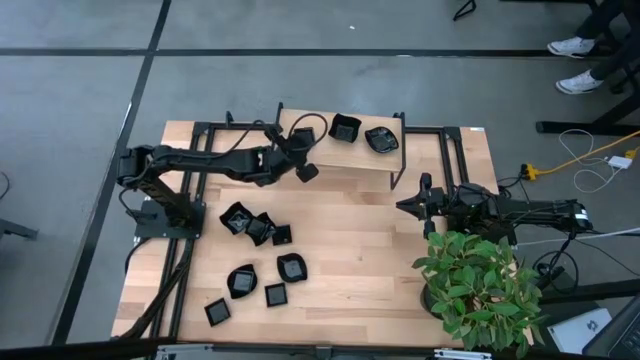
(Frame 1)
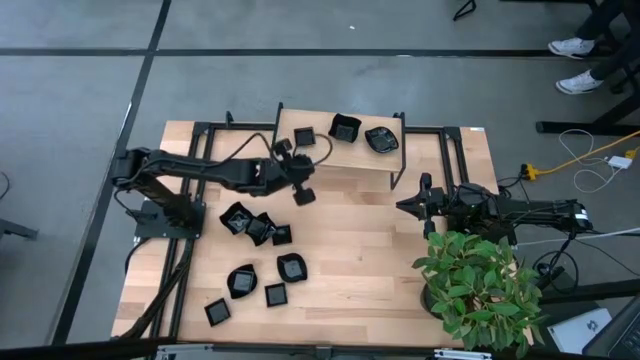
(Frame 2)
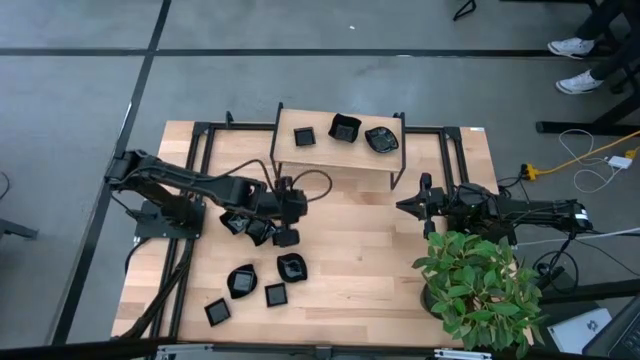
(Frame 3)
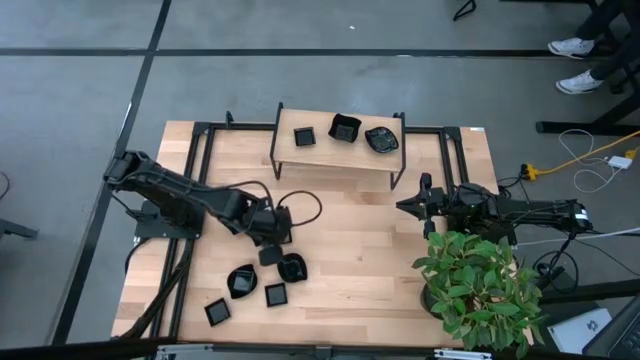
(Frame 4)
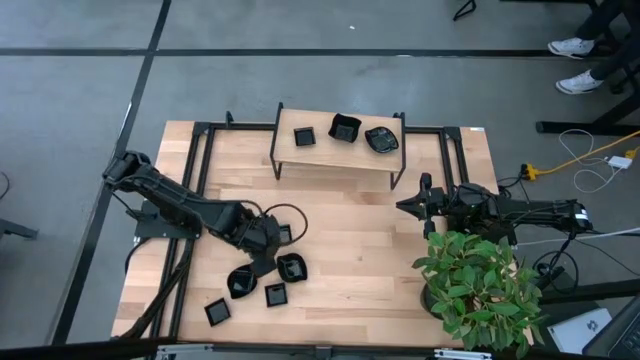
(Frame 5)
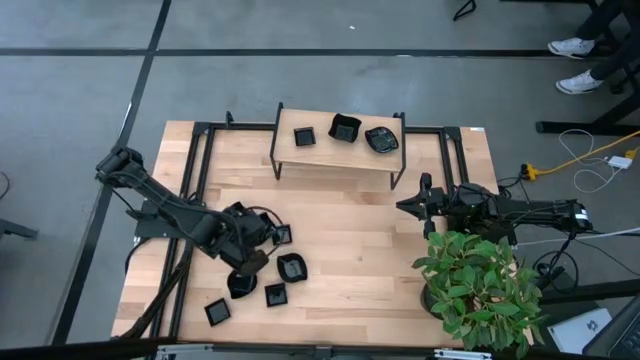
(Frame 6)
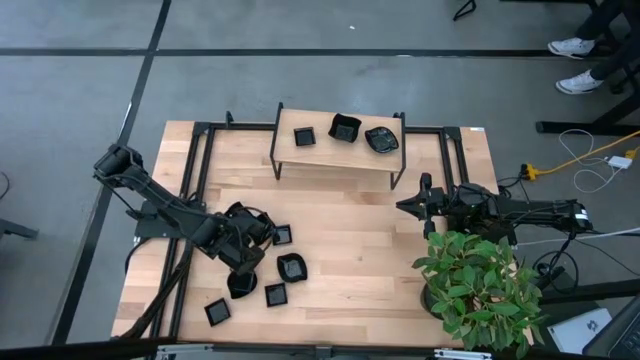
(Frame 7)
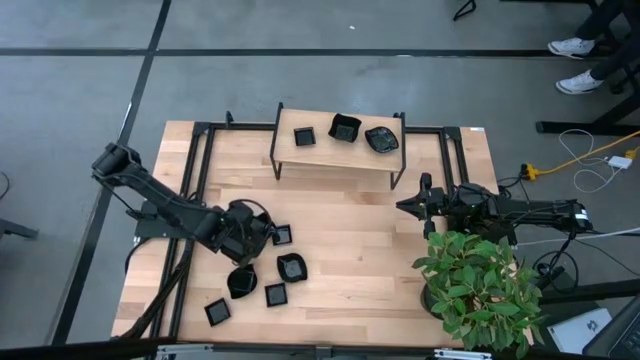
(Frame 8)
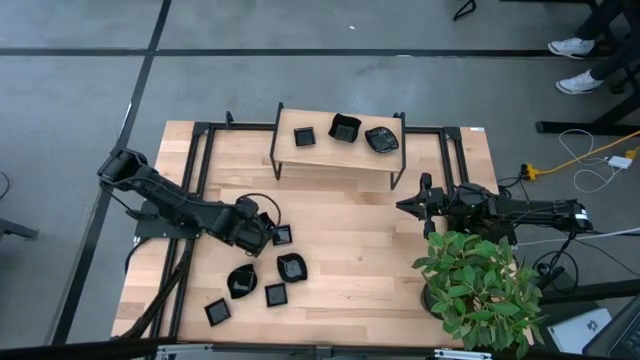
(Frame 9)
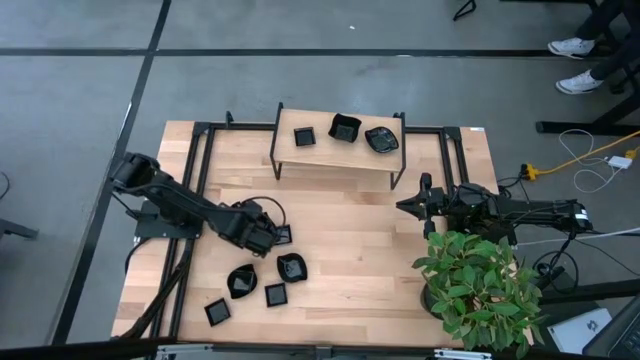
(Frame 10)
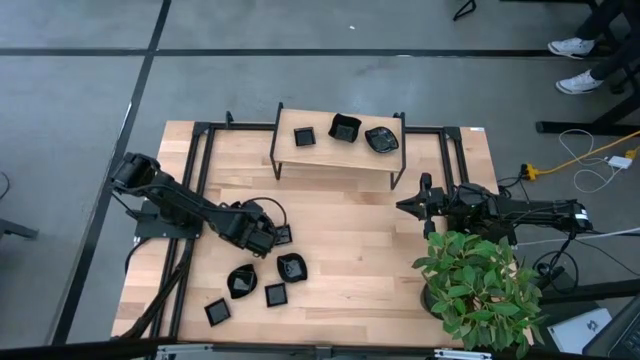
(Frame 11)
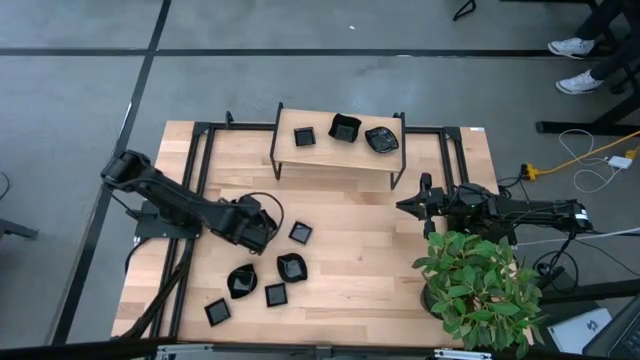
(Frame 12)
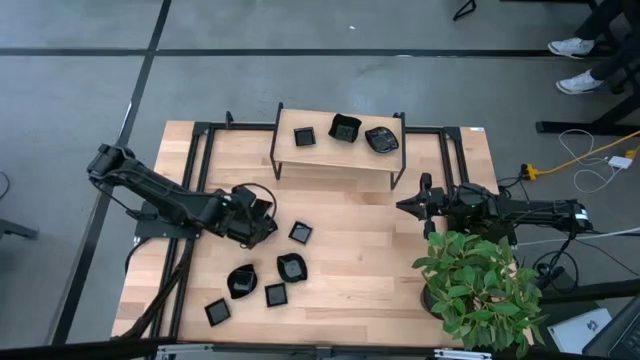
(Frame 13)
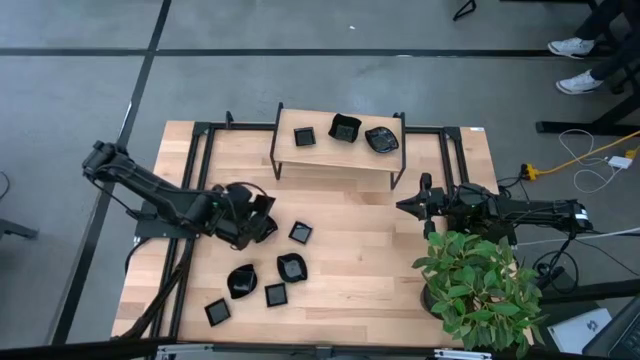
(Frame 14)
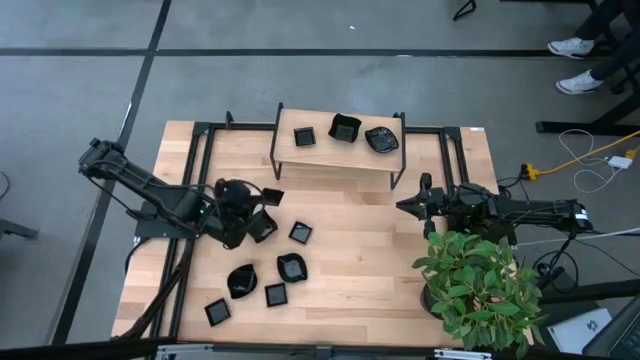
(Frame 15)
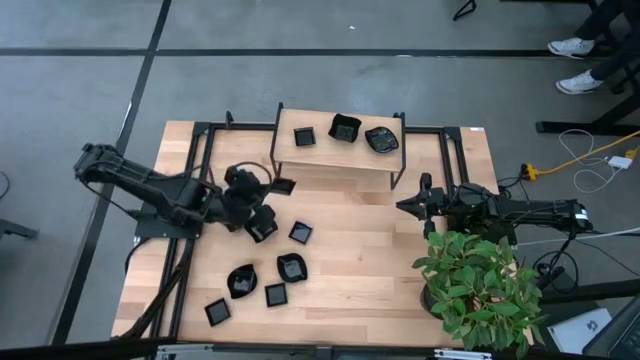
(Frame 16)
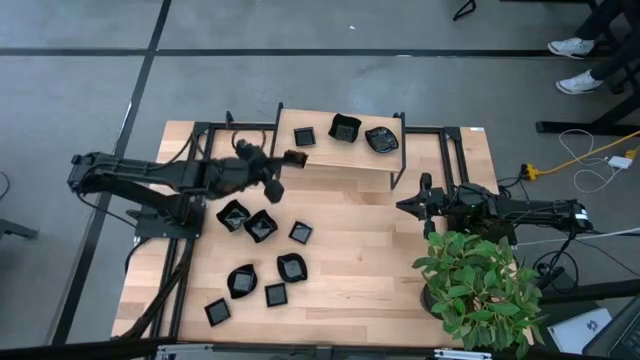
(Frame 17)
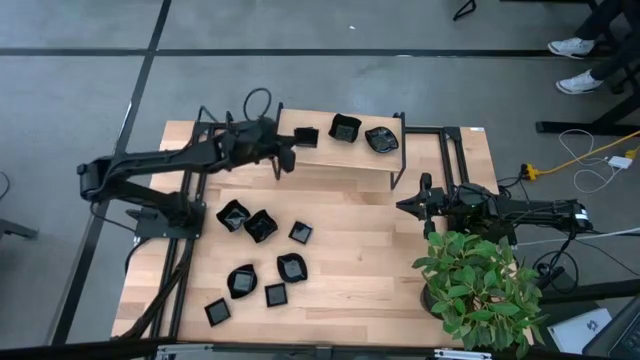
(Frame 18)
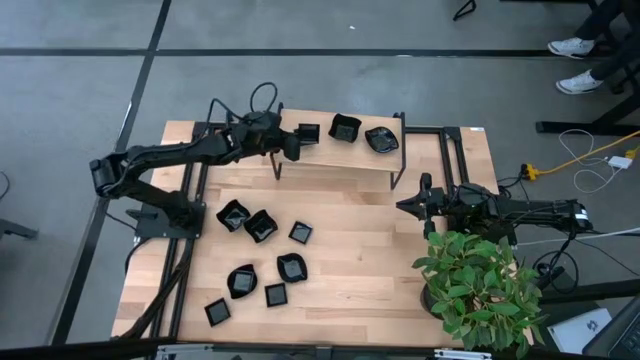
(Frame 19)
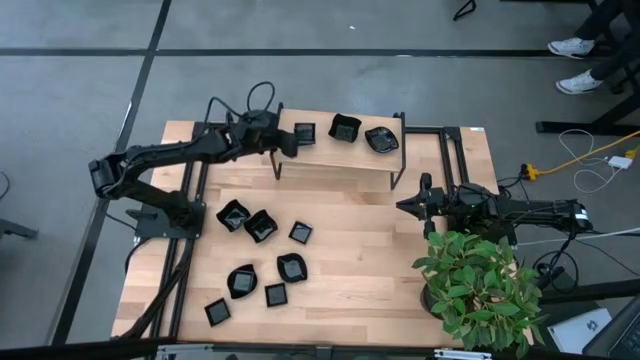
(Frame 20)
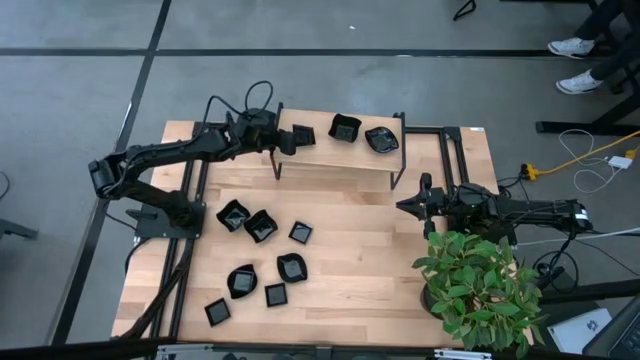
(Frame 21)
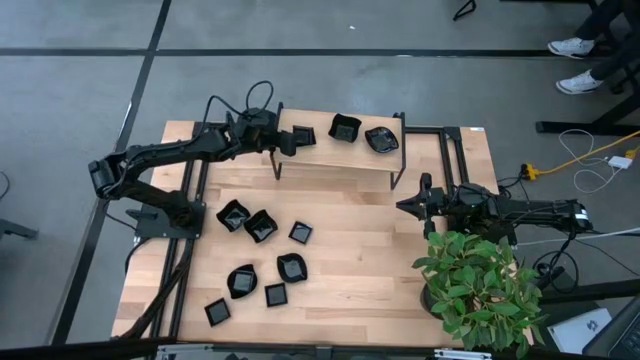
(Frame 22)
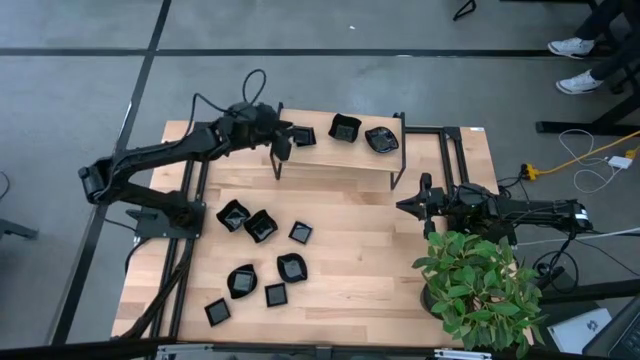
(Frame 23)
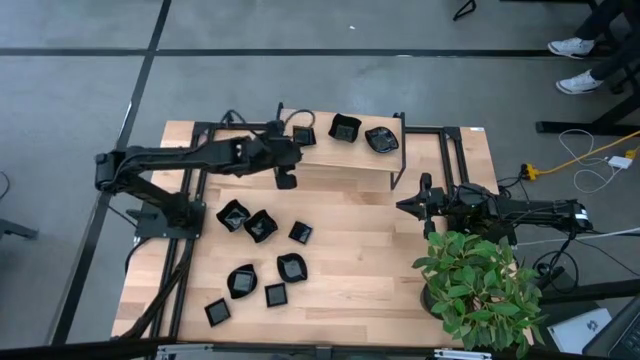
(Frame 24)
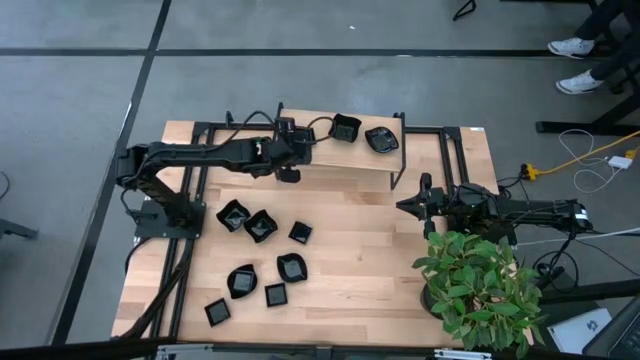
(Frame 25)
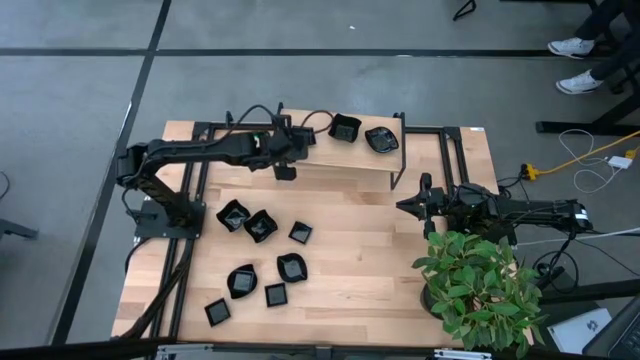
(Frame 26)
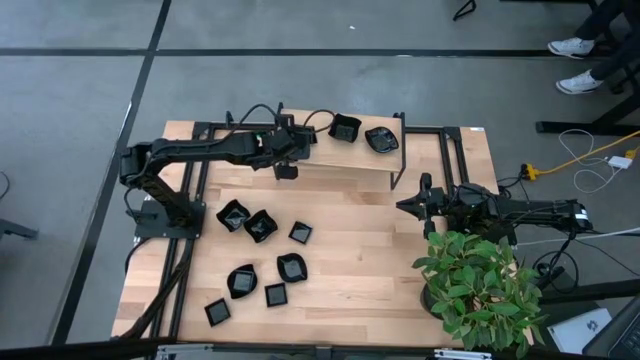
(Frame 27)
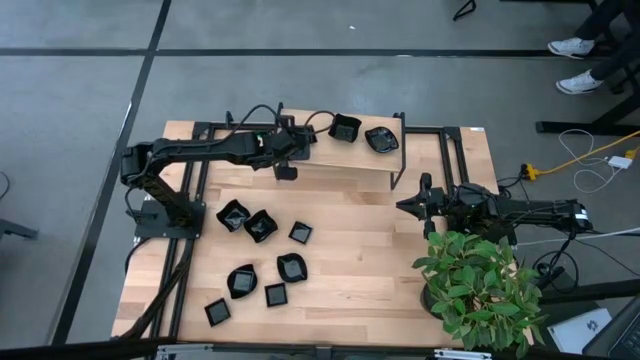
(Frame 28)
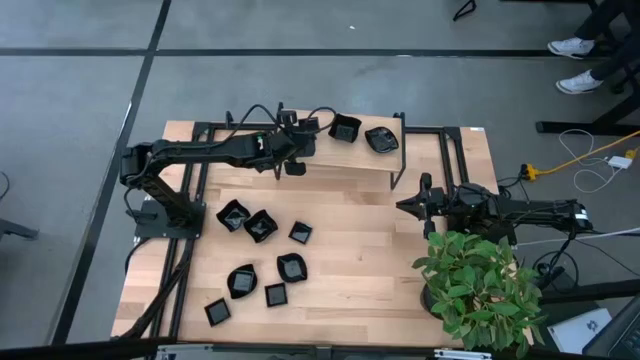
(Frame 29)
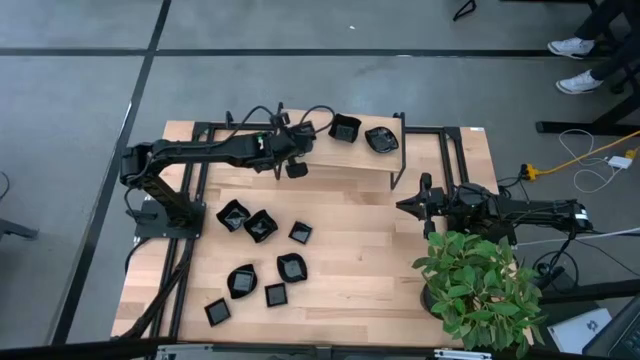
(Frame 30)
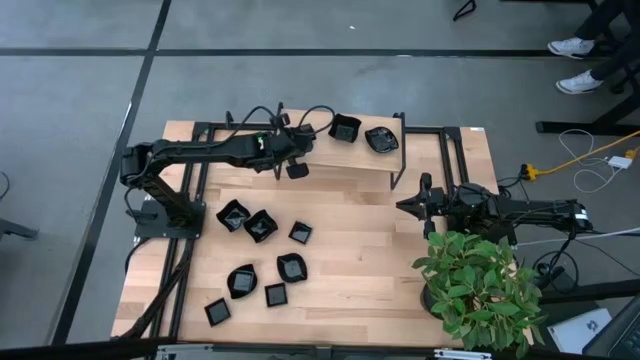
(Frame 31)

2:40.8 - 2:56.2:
Task: Pick & Place Mini shaped plates
Stack the square plate on top of the square plate on the shelf

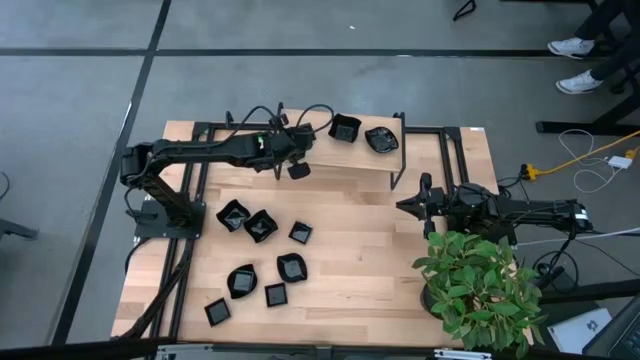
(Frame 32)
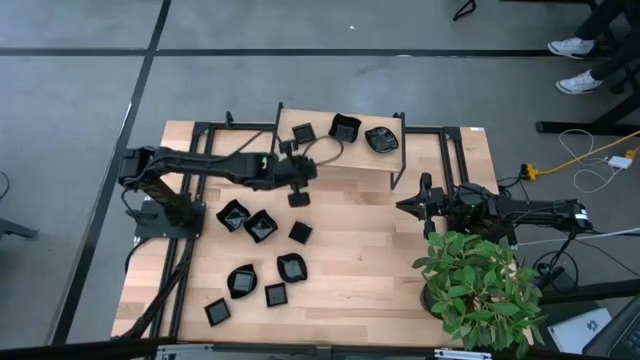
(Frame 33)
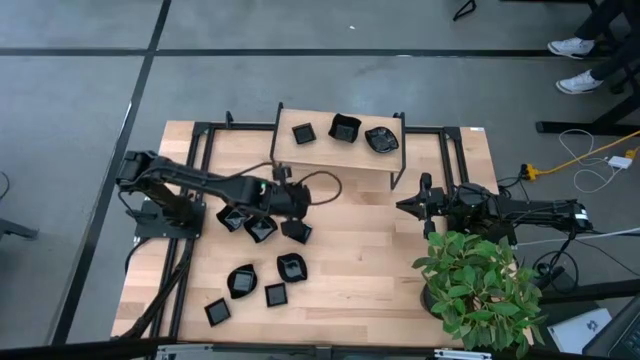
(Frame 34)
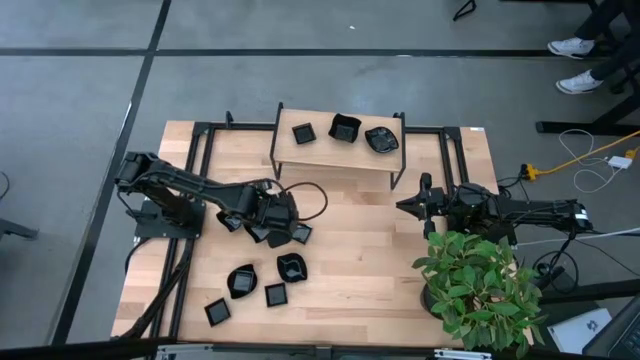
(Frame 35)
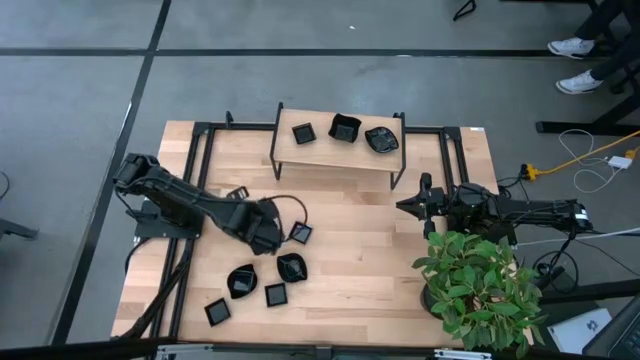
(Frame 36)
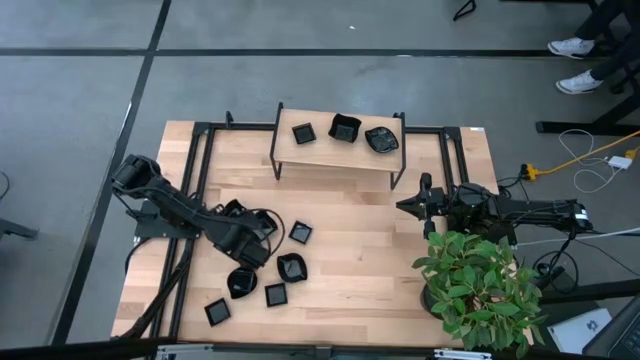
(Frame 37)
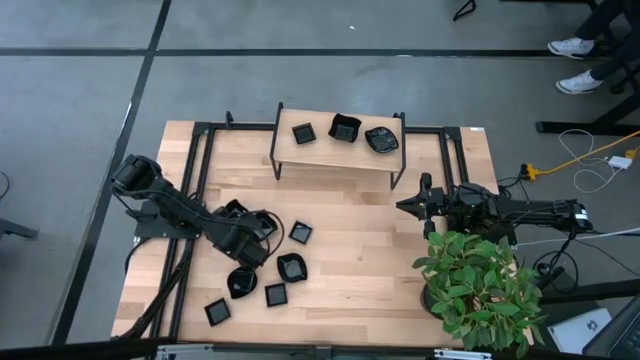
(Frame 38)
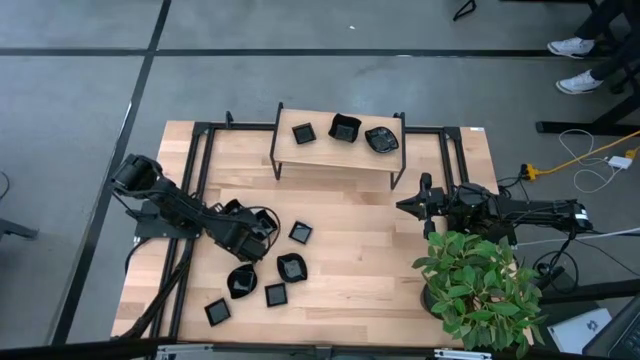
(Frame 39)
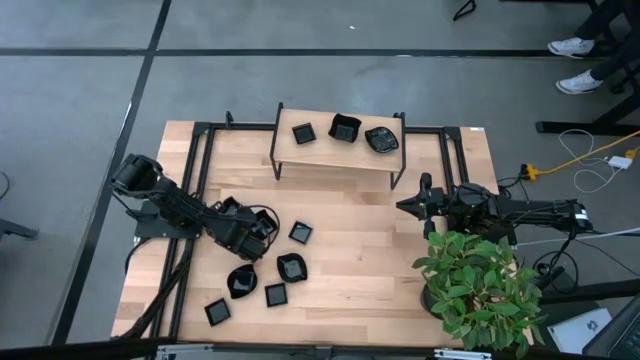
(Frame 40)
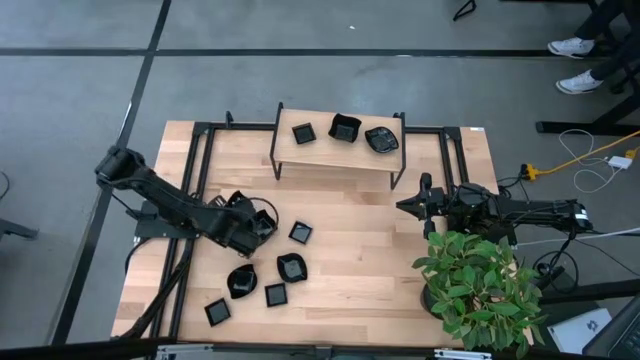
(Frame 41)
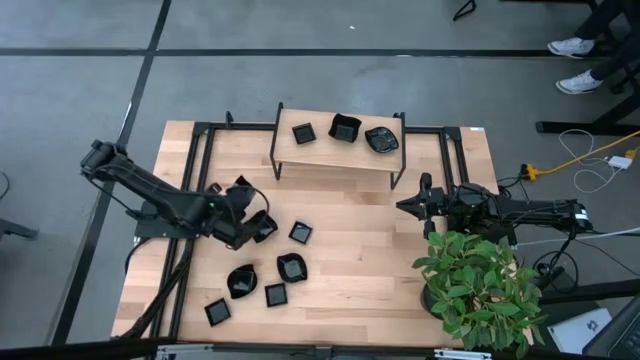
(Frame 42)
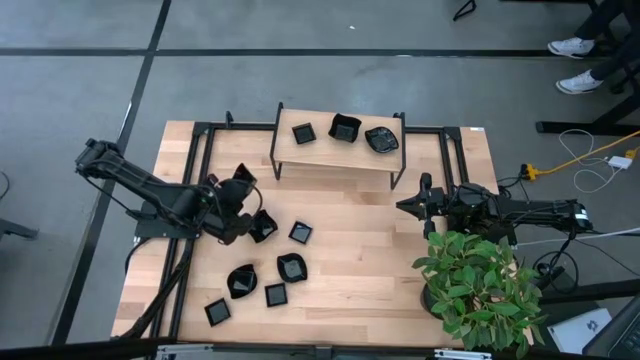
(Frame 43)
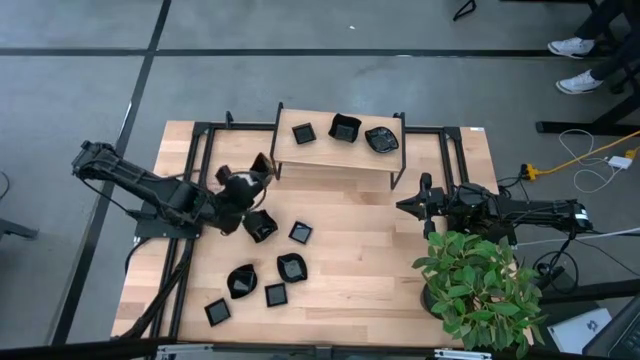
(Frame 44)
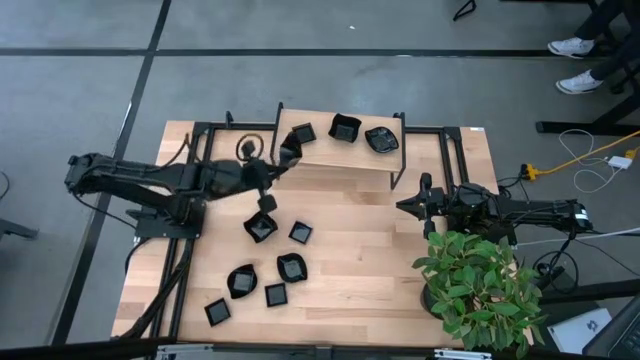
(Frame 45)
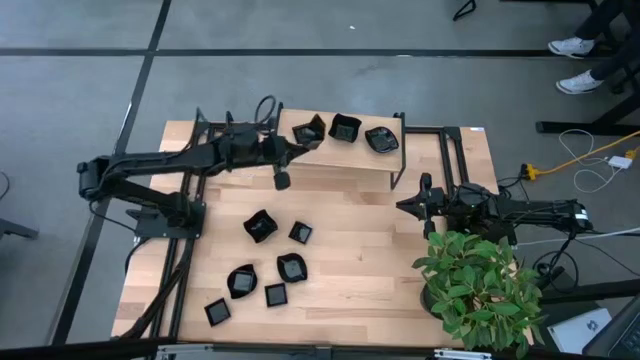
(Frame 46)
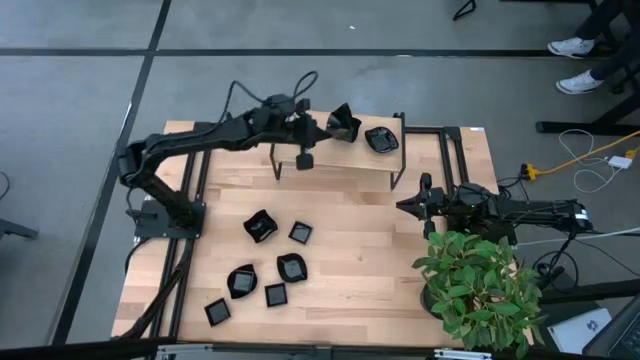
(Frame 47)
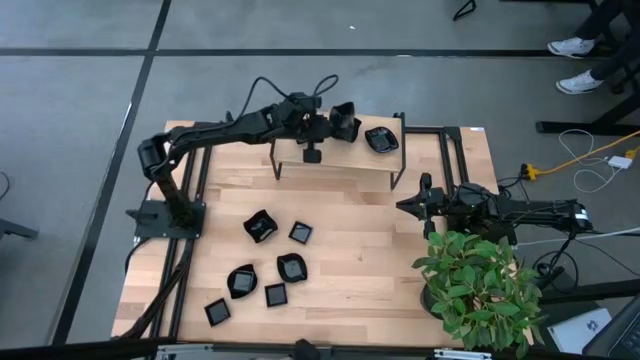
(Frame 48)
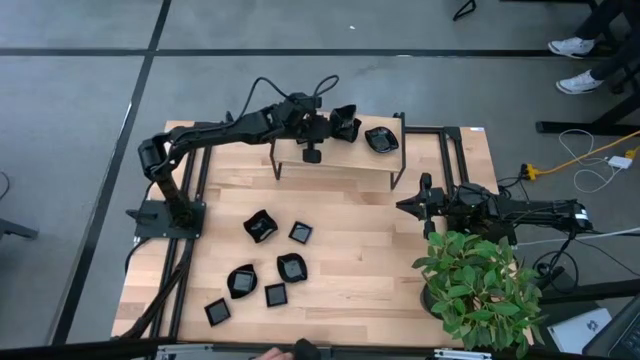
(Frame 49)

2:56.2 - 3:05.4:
Stack the distorted square plate on top of the distorted square plate on the shelf
